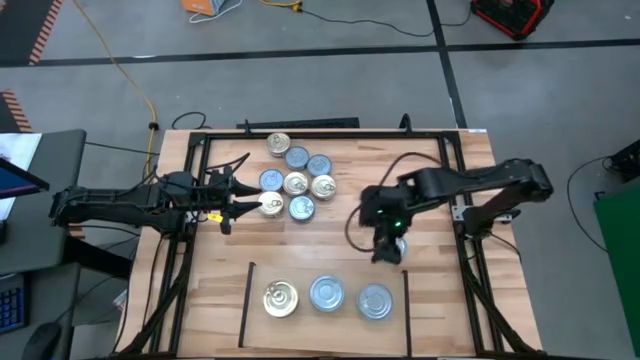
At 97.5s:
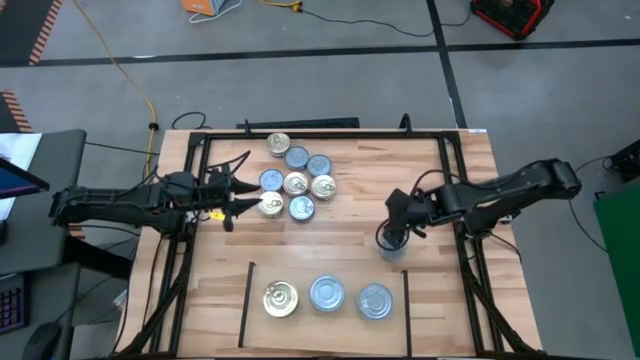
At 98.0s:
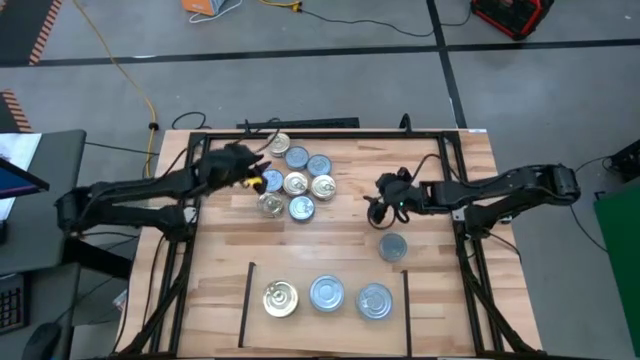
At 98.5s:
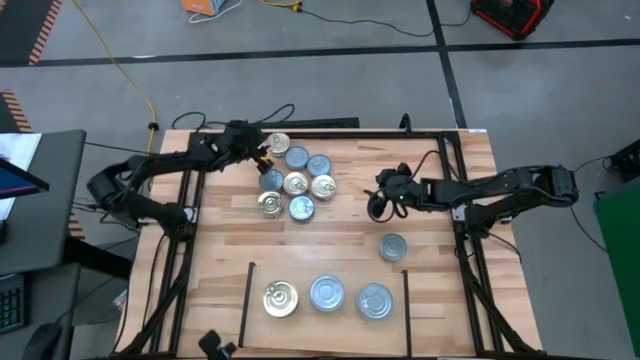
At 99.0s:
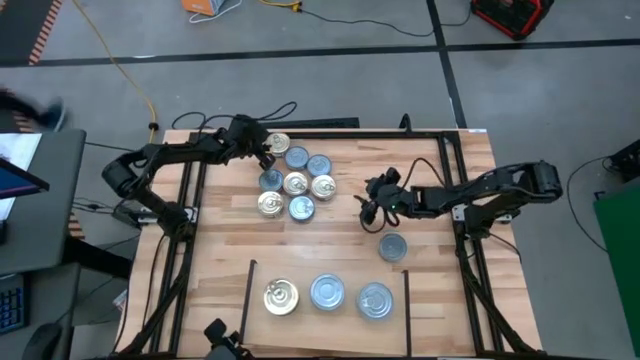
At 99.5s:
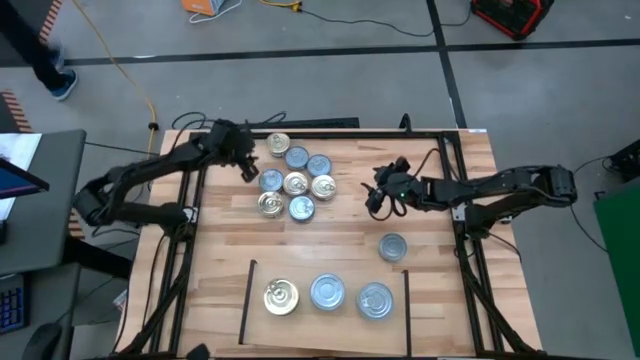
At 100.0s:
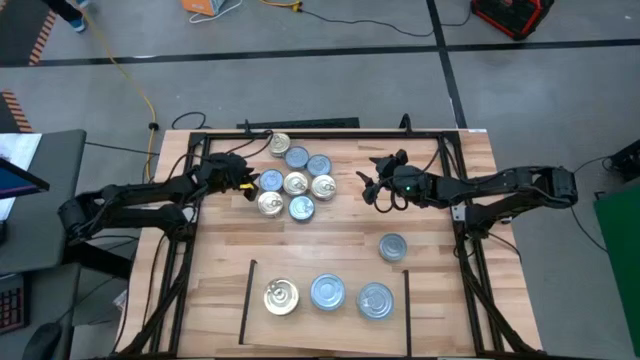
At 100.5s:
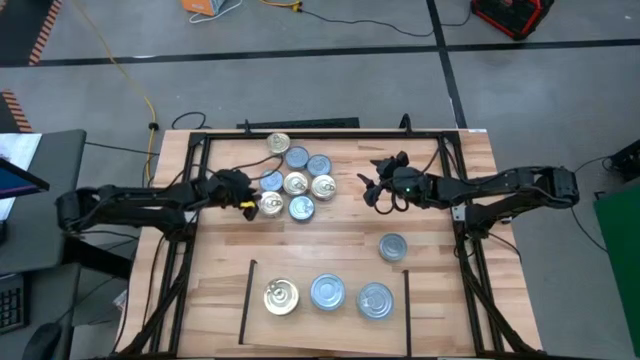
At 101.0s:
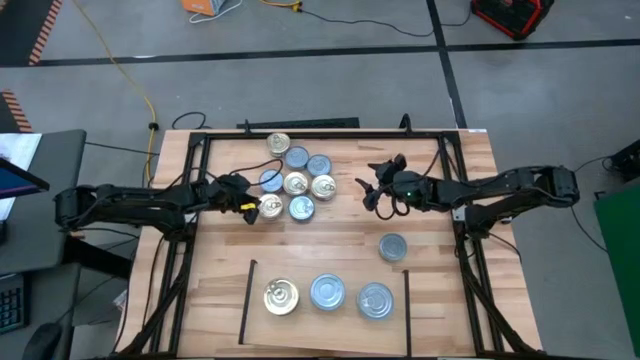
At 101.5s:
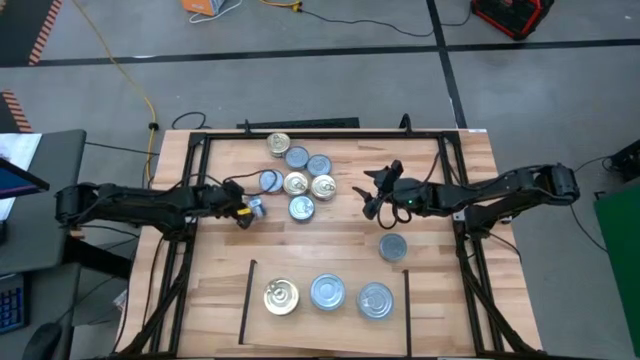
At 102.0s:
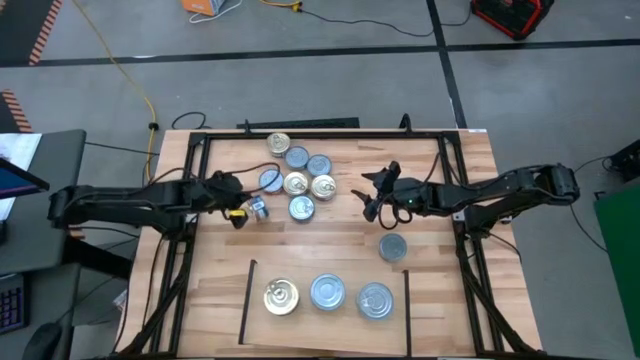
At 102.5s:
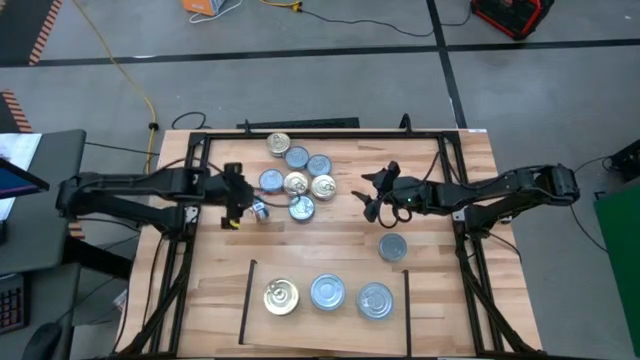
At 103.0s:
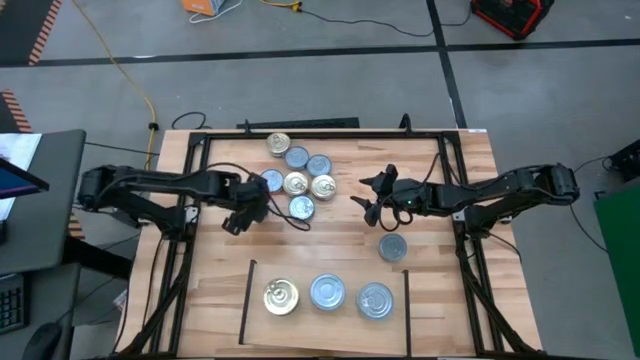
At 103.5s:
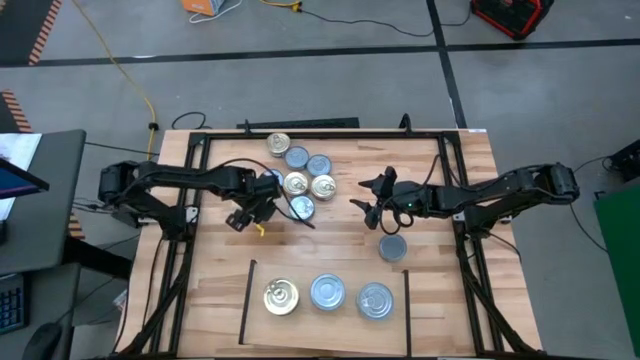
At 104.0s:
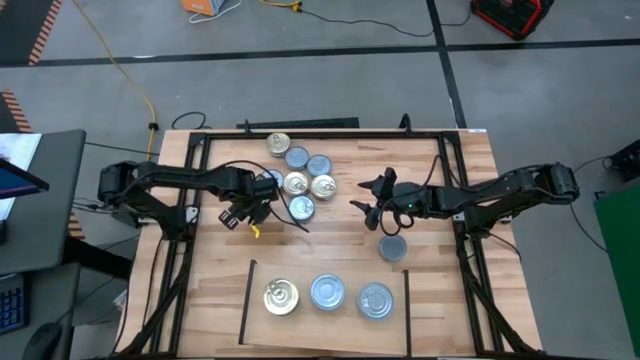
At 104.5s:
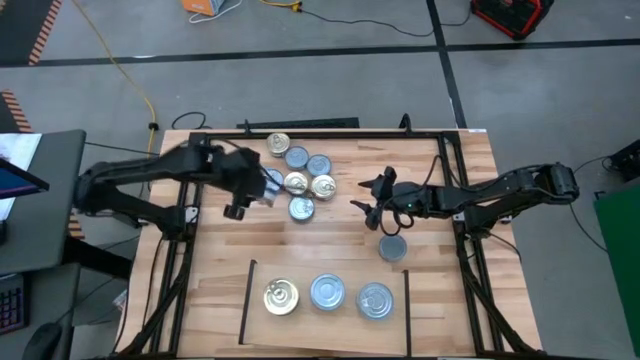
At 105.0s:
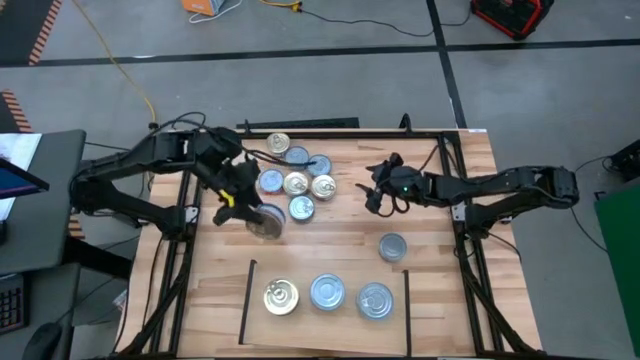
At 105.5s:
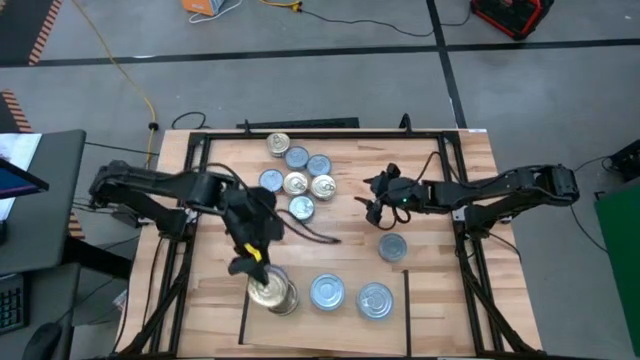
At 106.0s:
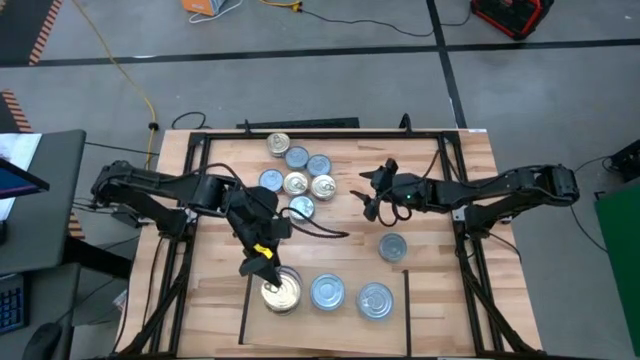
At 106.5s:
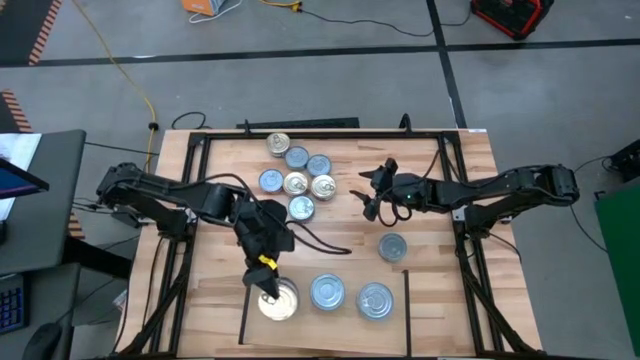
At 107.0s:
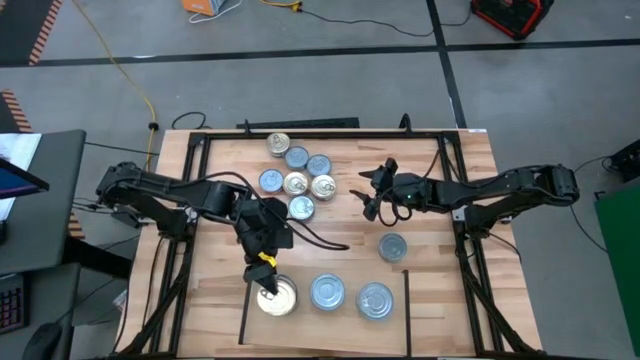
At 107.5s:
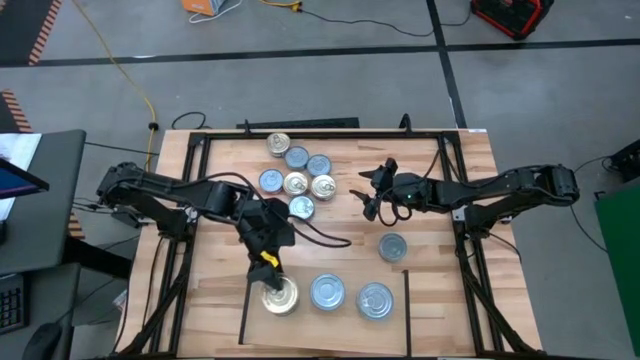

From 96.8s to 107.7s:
Task: Stack canned seafood by type on shelf
Put the blue and pink tuna can on the top of the left stacked tuna cans on the shelf

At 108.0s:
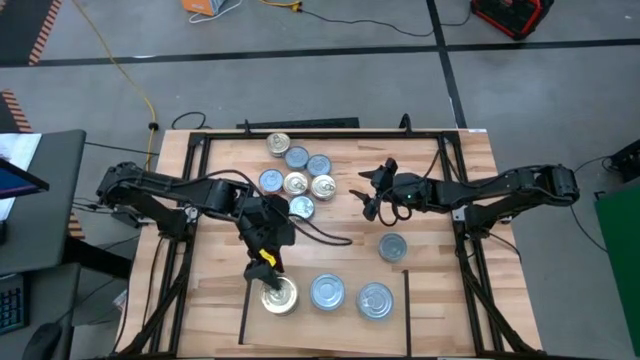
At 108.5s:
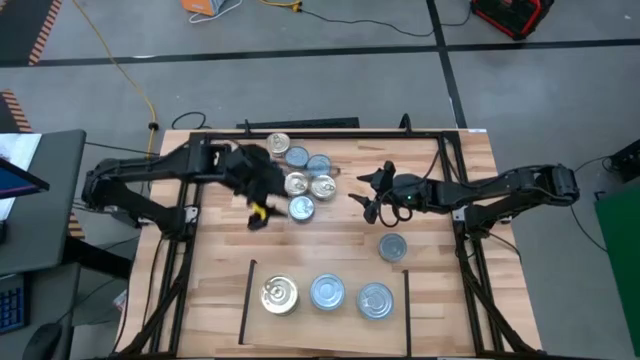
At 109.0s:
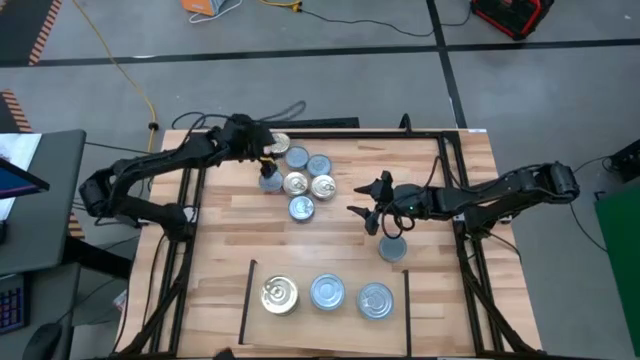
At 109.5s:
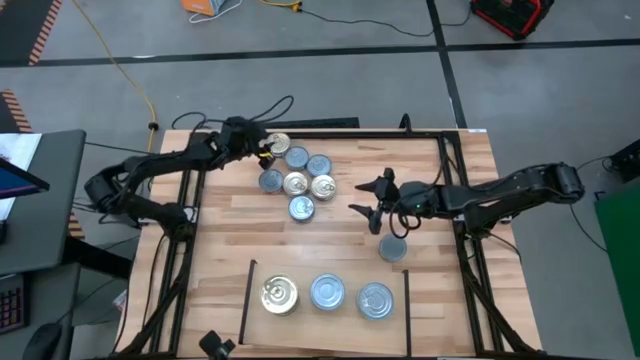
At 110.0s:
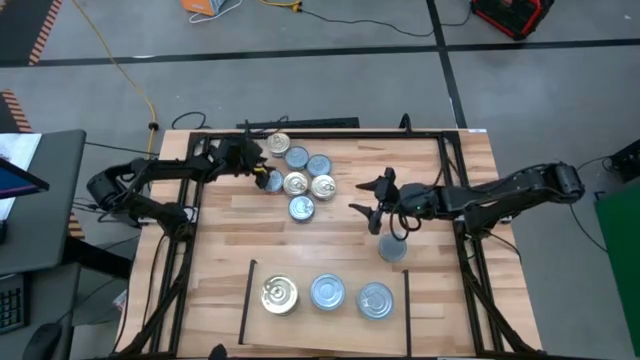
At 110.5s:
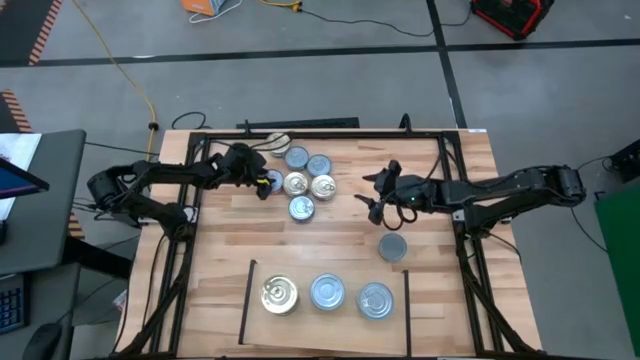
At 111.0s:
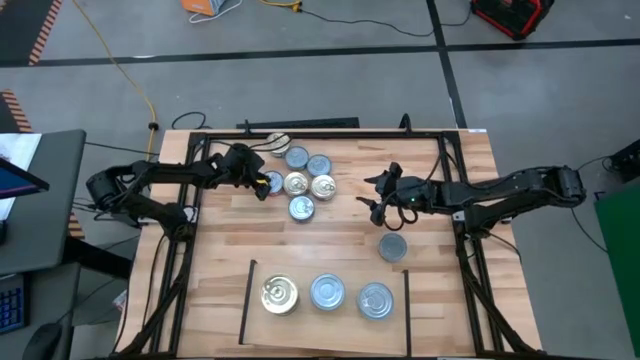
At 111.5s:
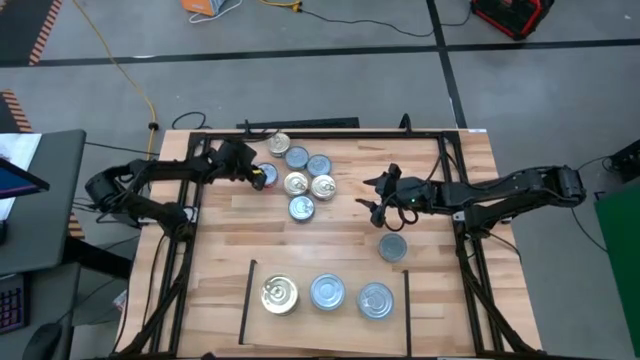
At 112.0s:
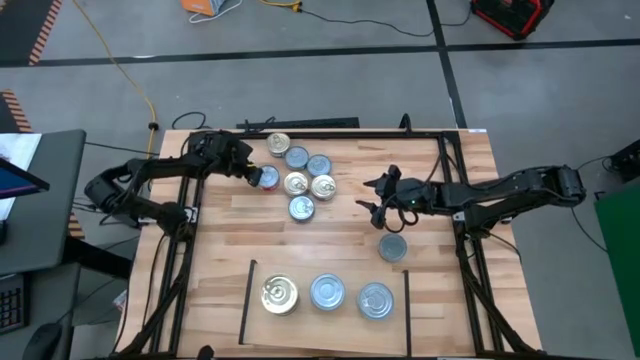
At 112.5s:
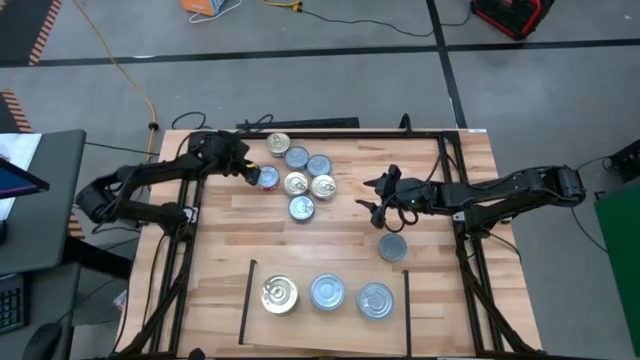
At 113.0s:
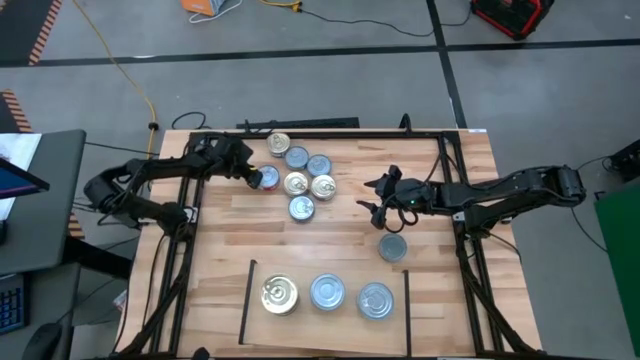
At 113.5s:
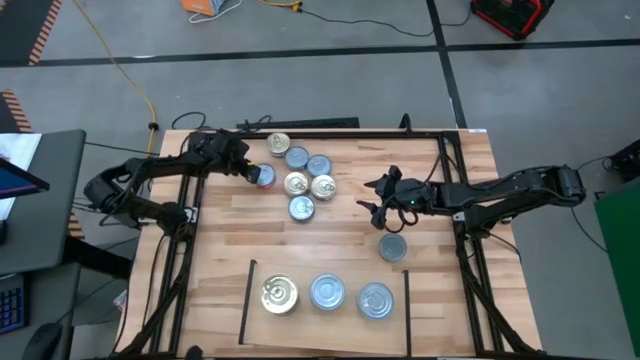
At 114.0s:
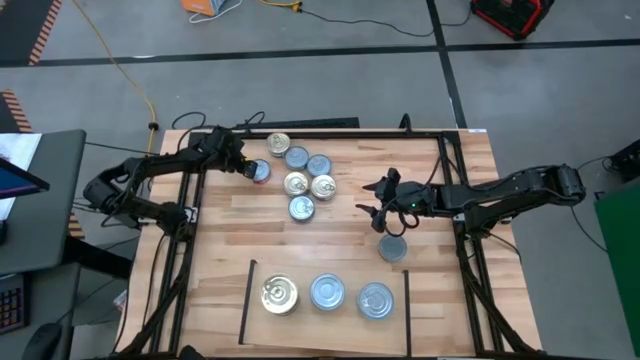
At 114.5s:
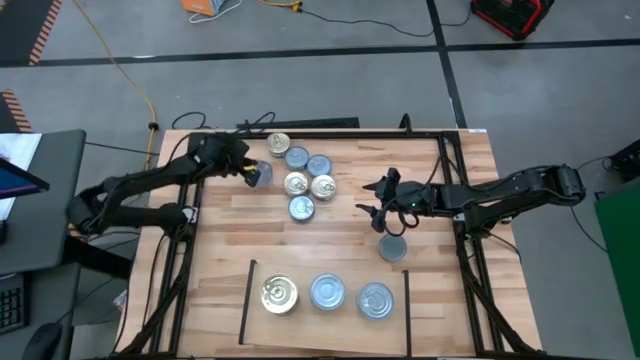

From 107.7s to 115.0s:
Put the red tuna can on the top of the right stacked tuna cans on the shelf

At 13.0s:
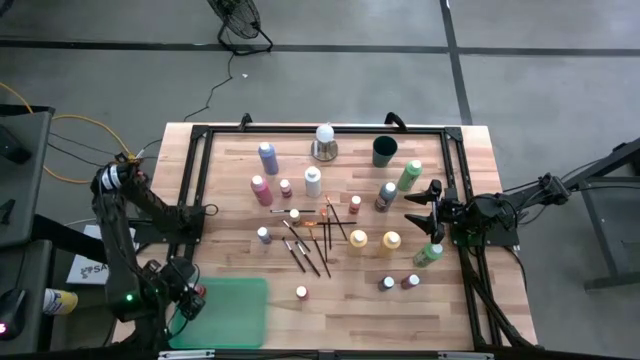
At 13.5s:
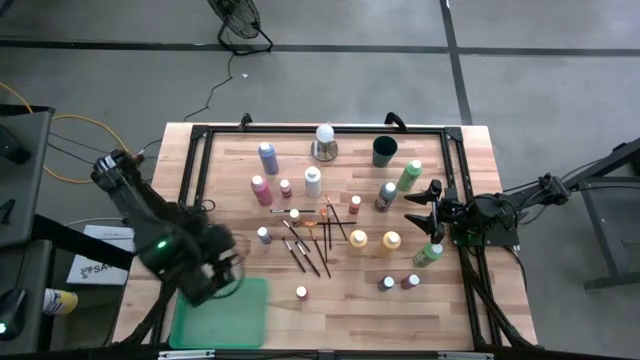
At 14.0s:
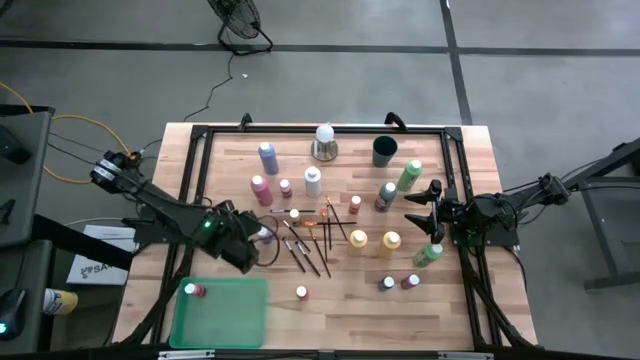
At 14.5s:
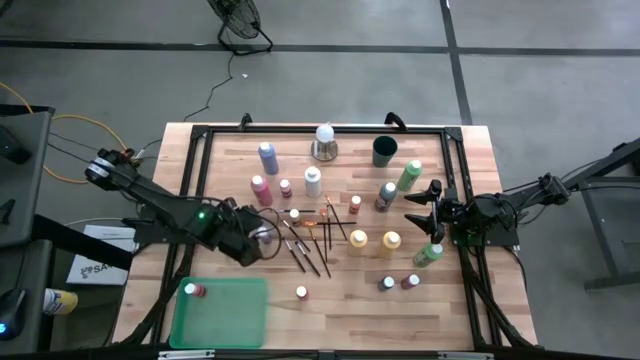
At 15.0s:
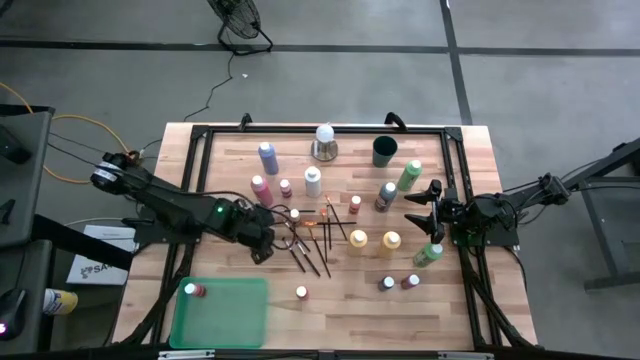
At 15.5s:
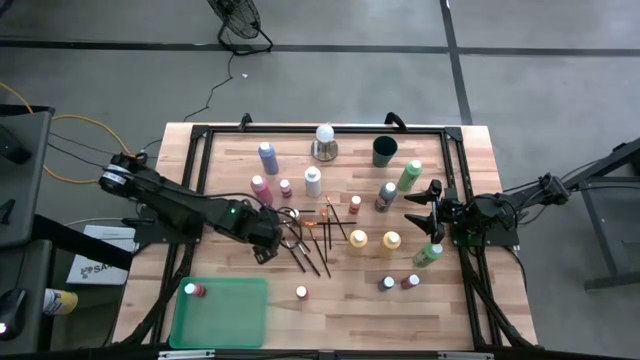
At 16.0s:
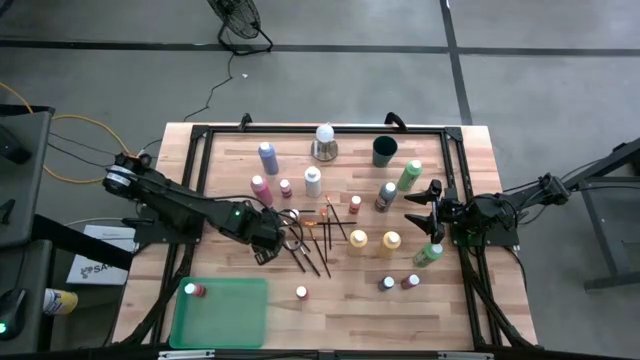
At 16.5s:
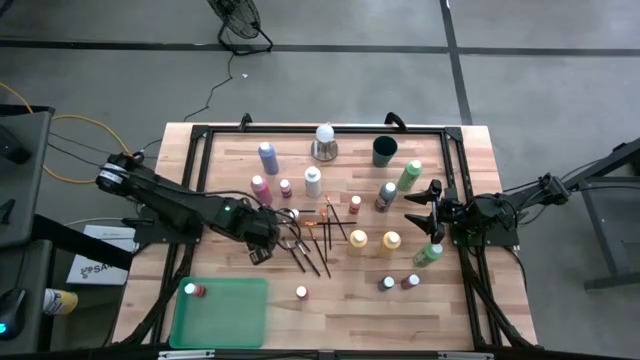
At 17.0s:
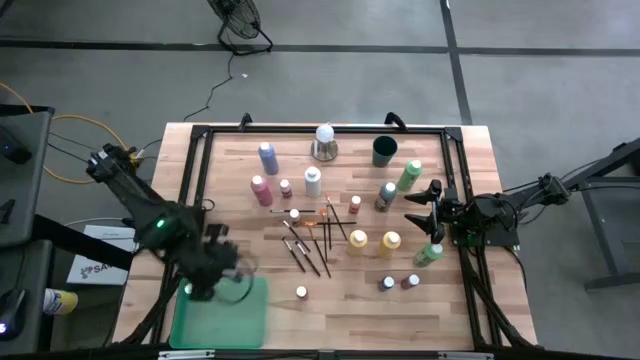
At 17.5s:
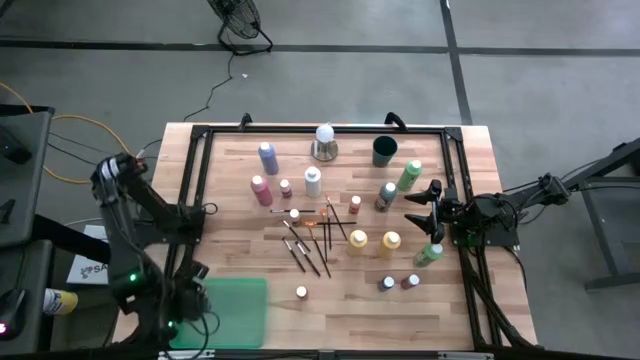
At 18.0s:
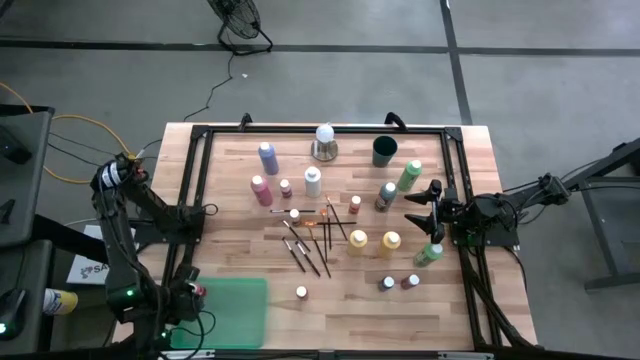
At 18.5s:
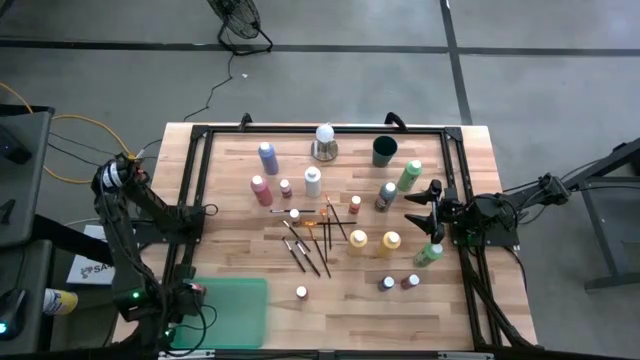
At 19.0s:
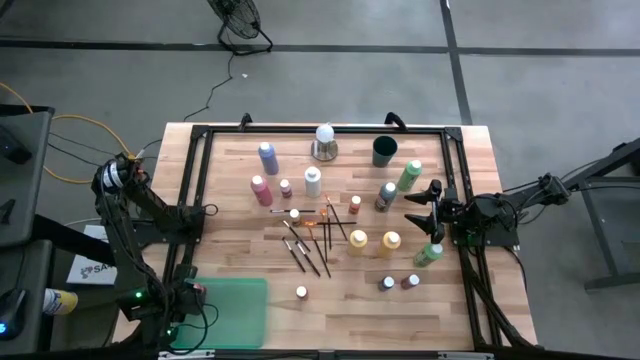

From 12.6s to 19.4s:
Task: Pick & Place Paint Supplies
Put the purple paint bottle into the green bin
